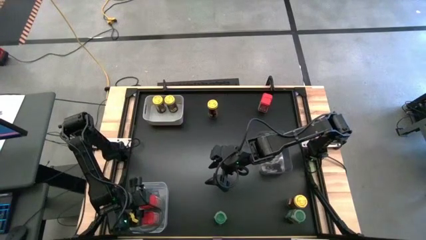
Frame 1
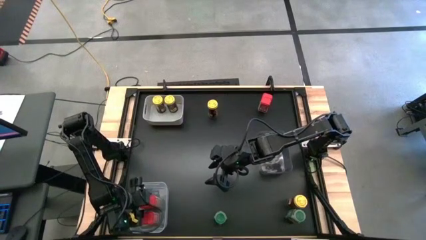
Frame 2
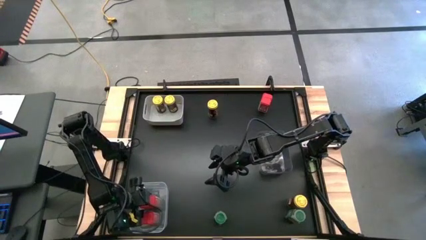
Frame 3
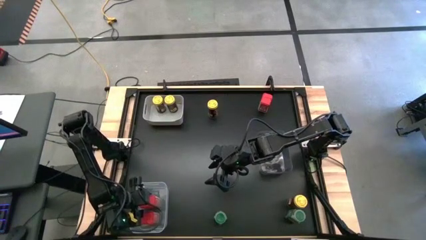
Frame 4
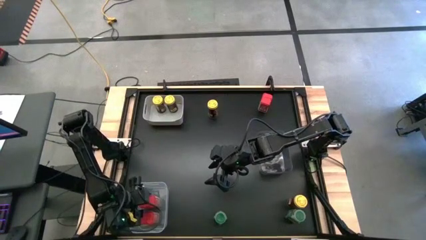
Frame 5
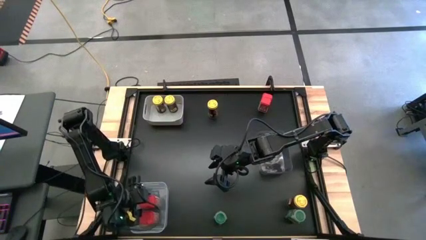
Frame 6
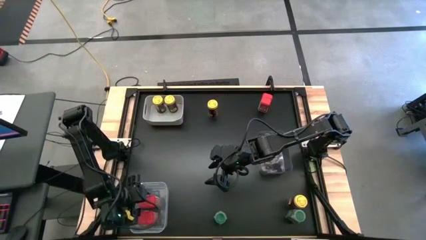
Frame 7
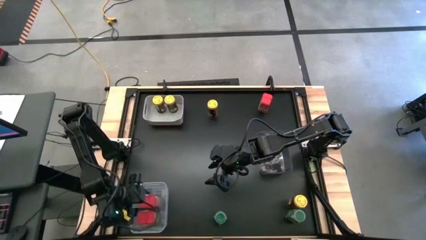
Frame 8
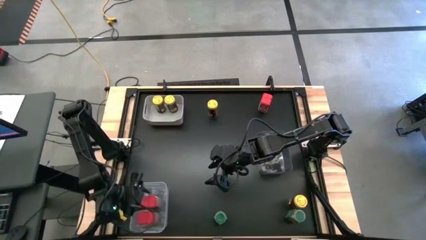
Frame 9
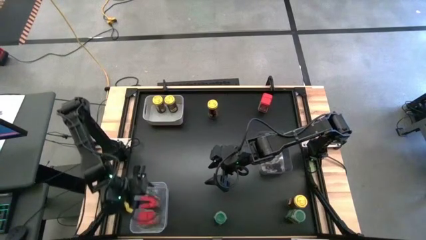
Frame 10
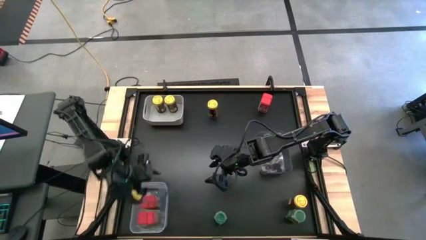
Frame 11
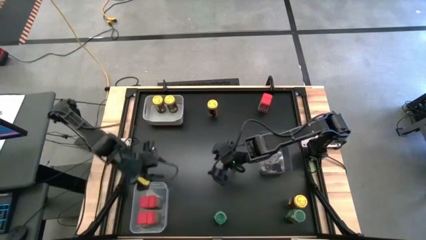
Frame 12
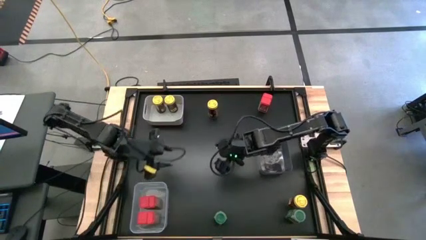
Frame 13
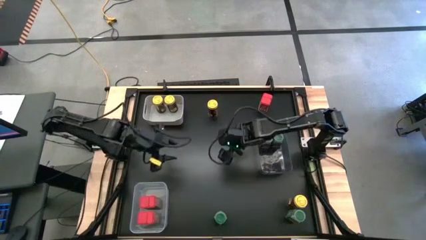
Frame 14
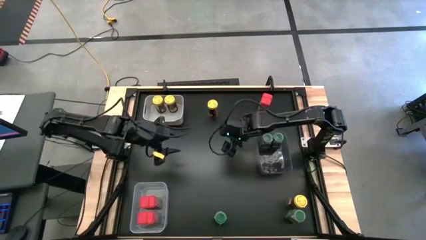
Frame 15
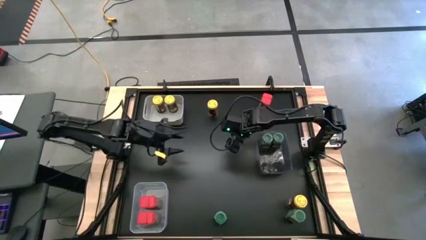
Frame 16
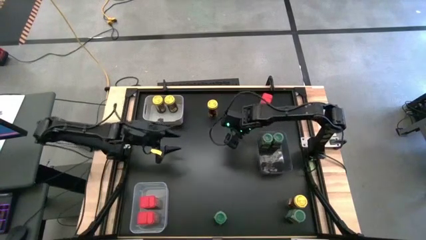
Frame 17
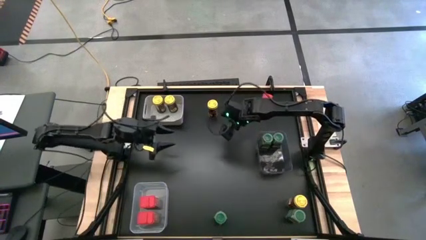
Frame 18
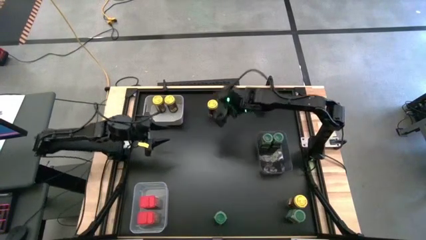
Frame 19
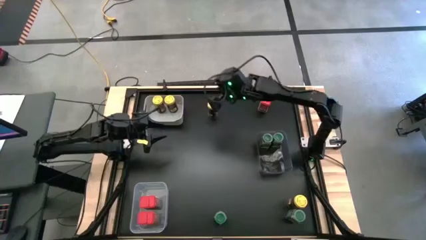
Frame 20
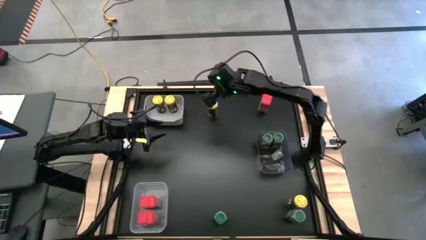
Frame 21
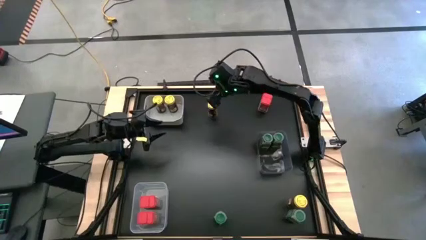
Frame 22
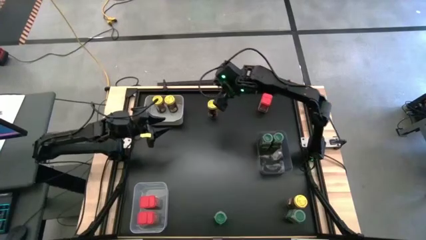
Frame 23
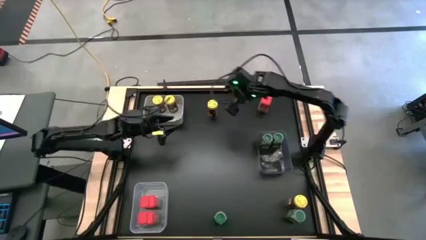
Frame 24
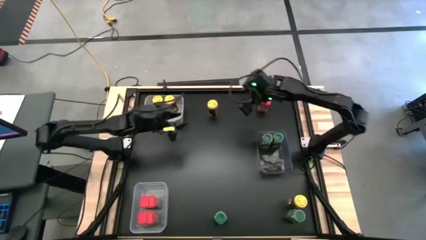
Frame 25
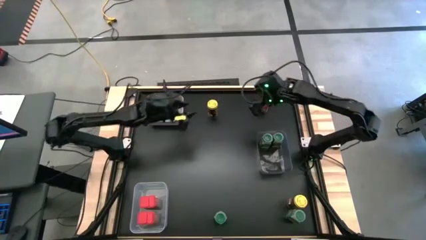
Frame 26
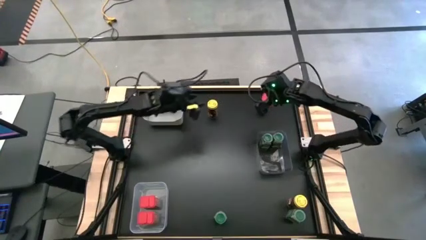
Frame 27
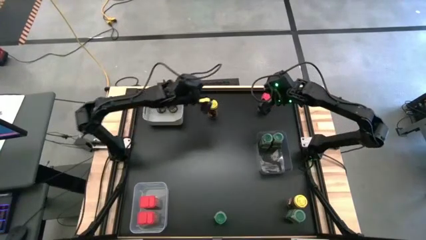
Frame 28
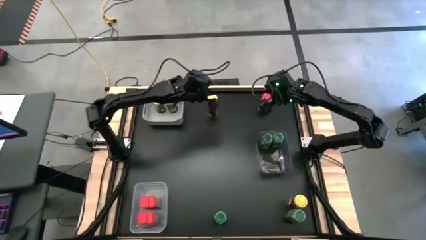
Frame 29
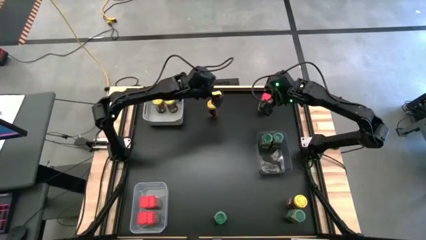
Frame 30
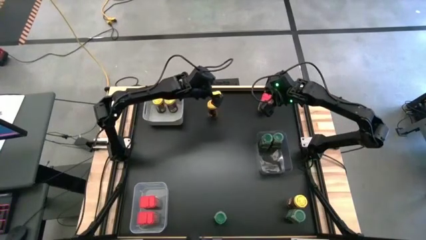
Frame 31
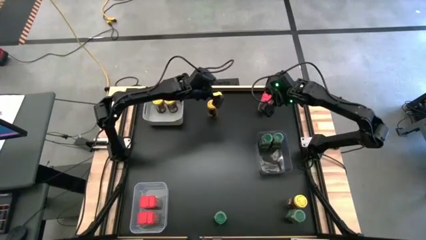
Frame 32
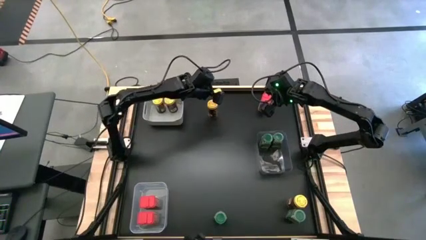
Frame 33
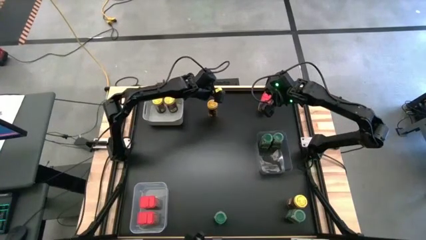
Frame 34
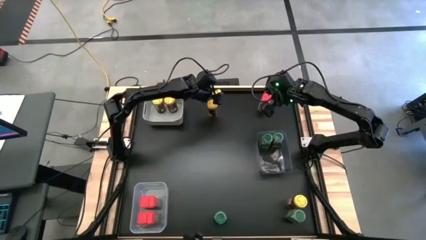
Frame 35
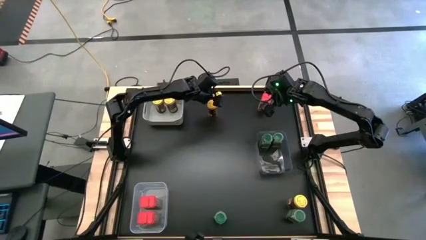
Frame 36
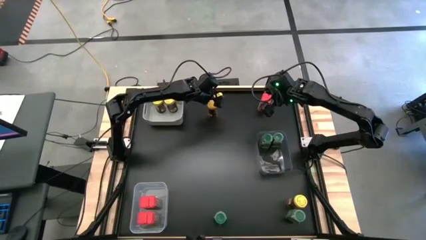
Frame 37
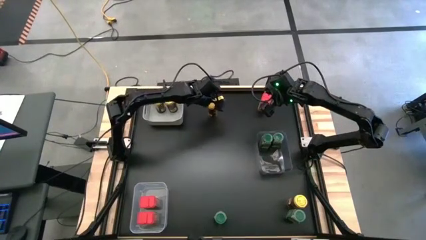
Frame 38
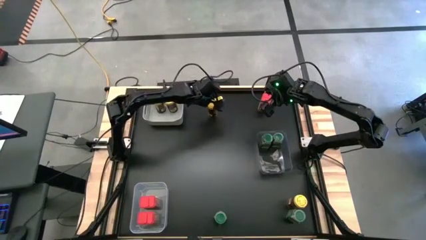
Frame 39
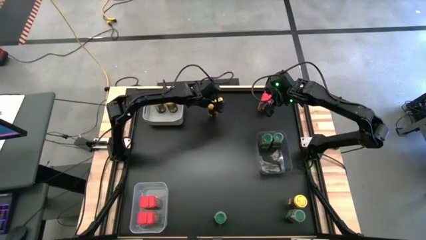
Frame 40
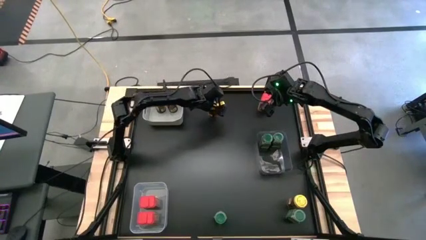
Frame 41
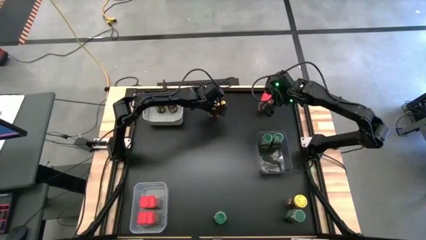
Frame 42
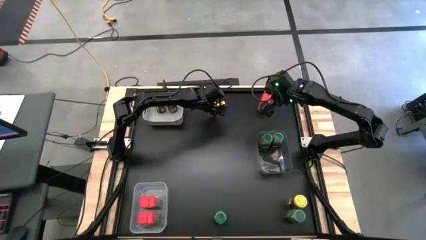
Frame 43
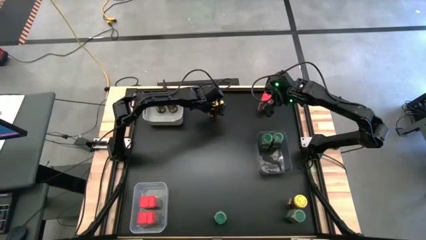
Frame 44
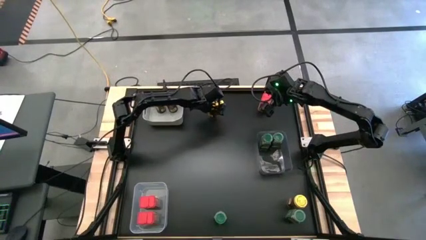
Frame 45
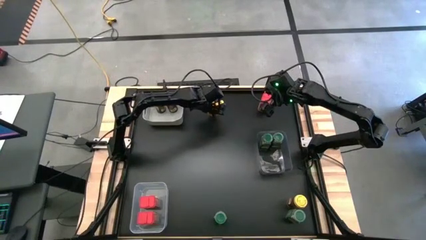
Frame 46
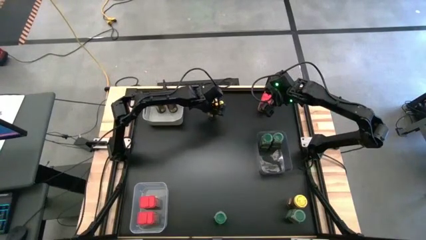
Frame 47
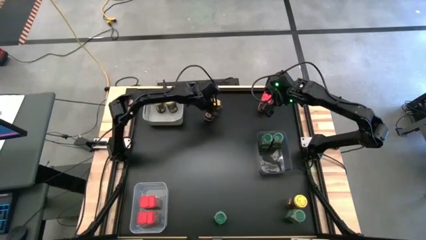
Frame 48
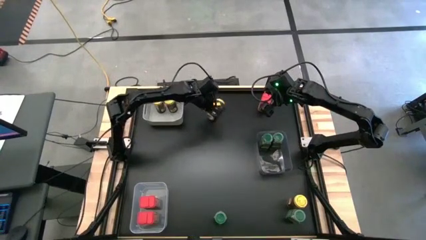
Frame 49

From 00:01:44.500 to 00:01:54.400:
Task: Sort spices by type
Put the top yellow seasoning bottle into the gray bin

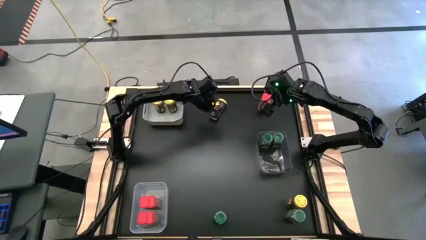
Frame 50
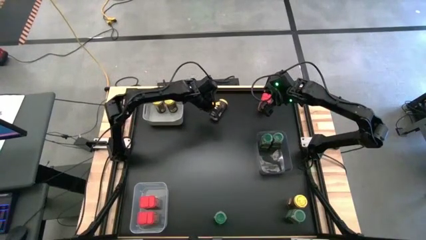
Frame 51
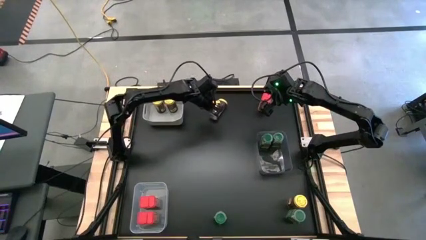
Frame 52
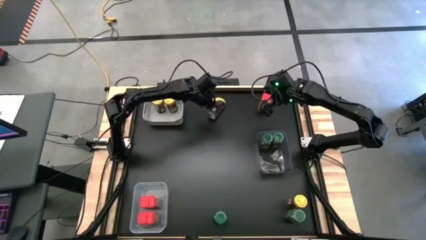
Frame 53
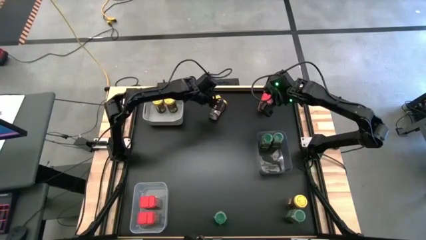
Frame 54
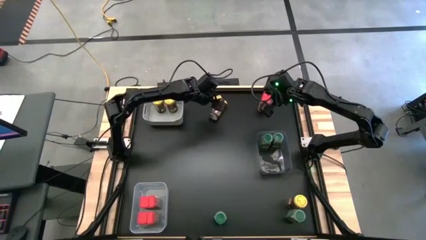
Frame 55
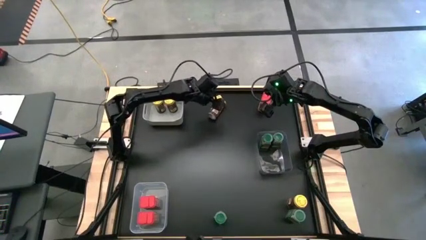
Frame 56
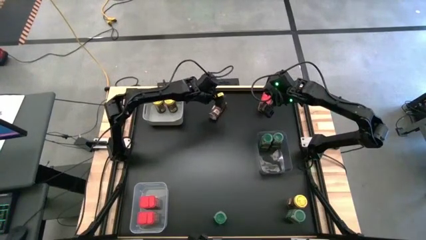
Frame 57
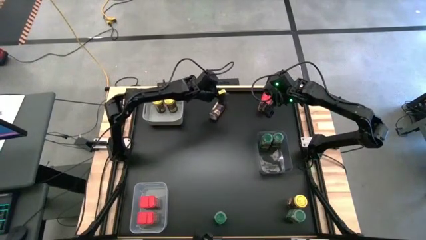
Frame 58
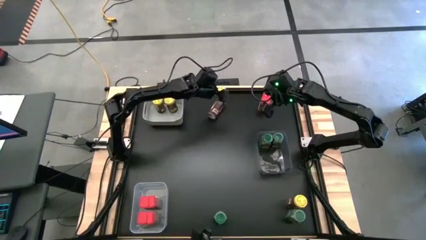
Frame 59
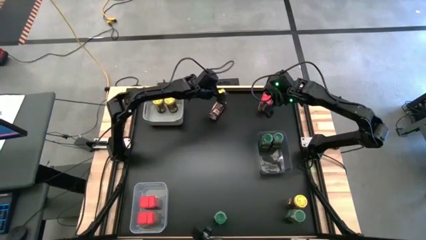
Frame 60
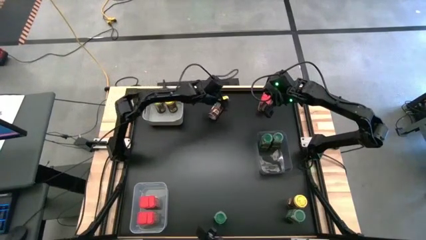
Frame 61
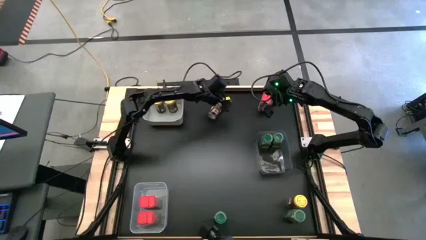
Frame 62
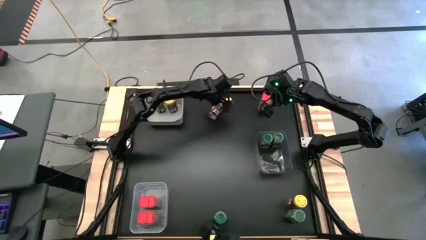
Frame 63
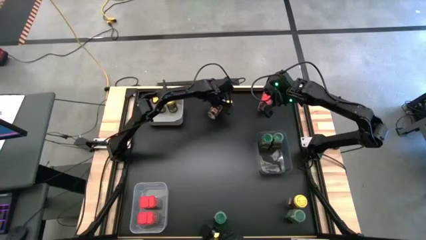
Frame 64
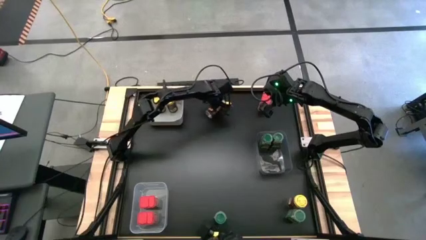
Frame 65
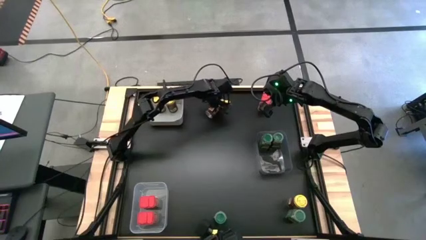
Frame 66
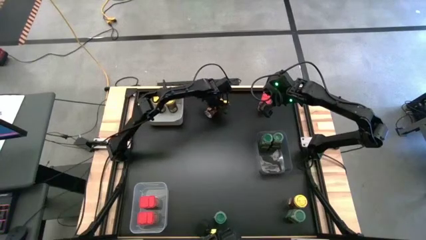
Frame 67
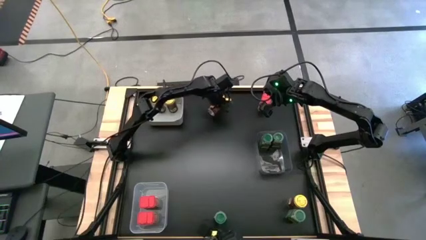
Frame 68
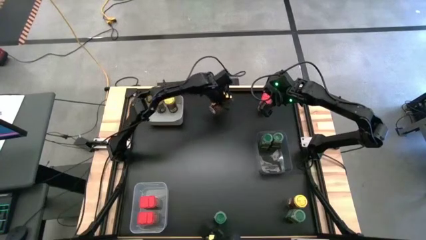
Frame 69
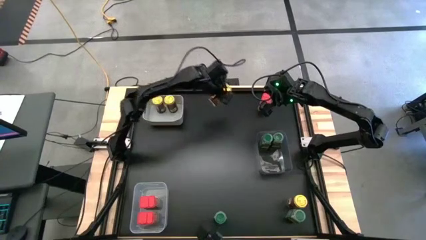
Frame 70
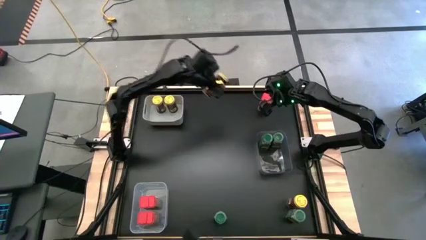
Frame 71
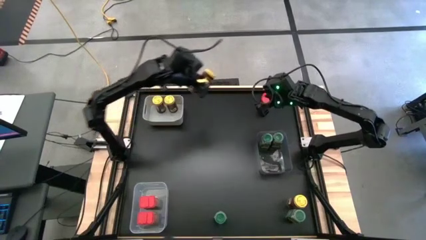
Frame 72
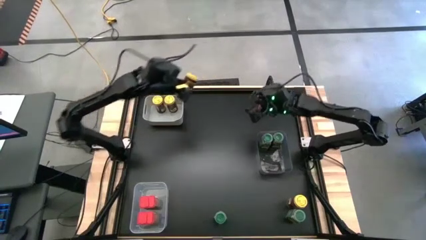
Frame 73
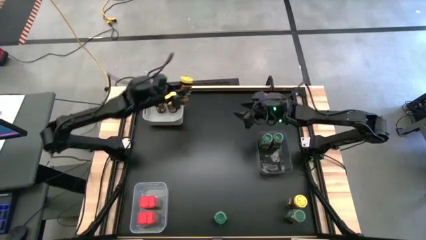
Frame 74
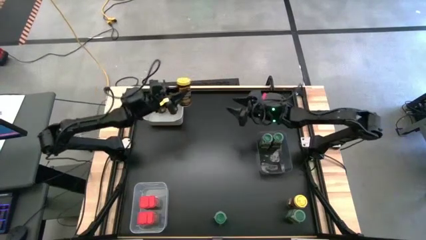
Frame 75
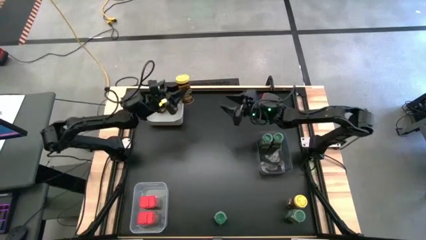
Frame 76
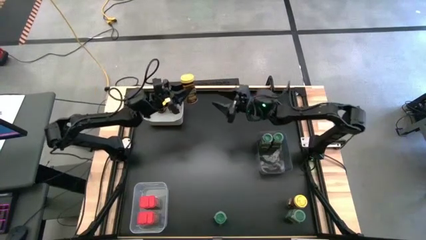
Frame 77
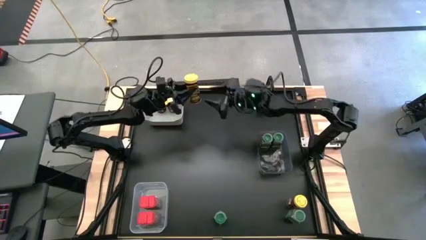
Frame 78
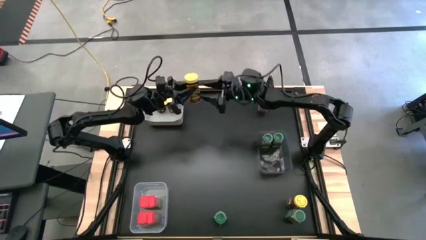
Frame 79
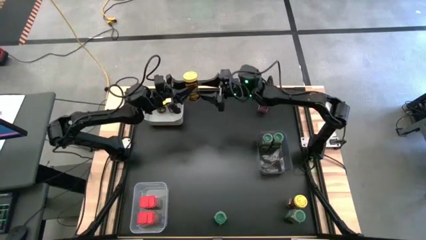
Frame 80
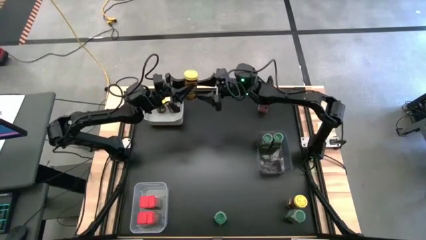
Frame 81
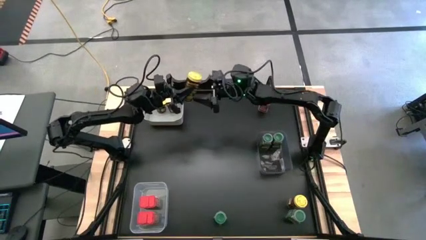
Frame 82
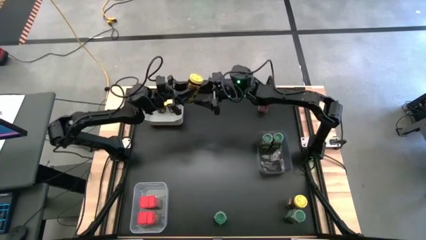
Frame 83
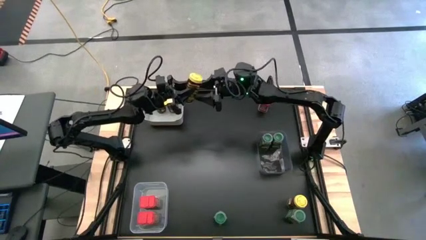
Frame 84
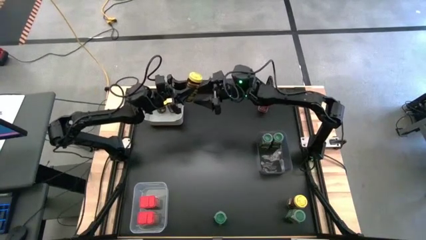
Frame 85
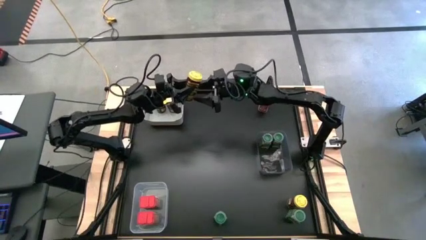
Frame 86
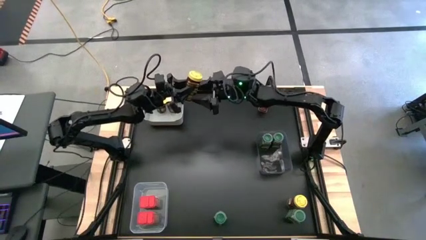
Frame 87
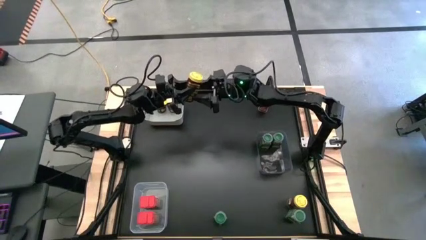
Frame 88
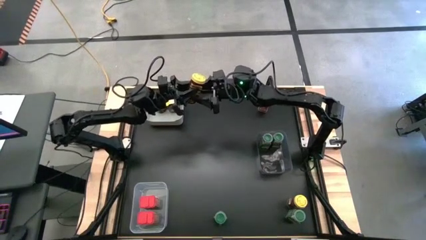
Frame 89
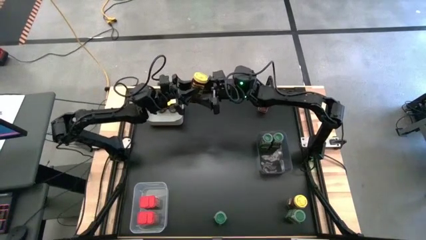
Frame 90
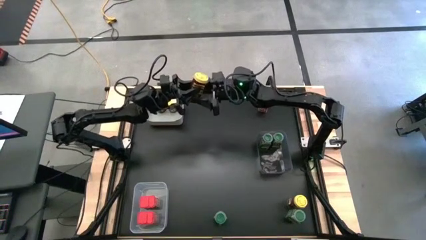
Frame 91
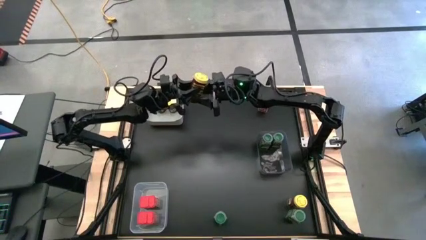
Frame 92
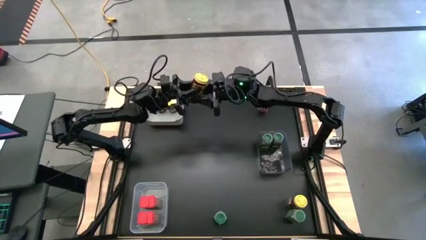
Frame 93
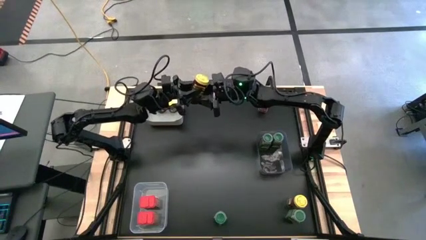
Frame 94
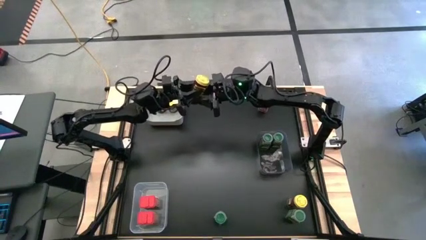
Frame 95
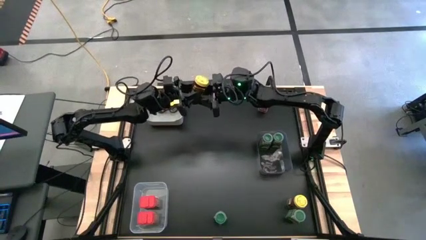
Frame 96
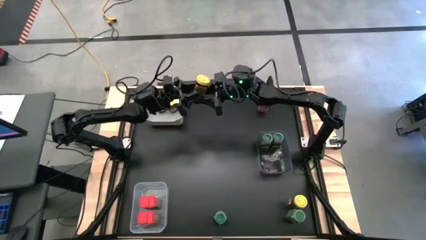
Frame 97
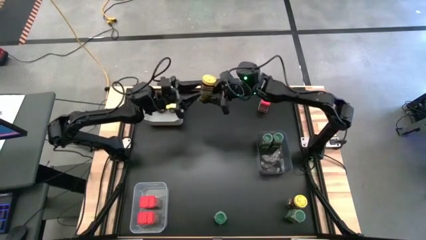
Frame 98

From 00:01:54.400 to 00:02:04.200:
Put the top yellow seasoning bottle into the gray bin
